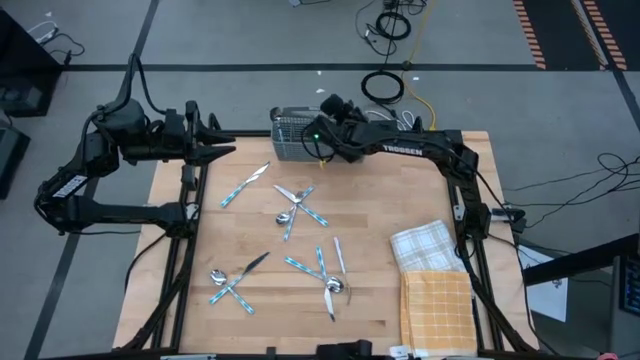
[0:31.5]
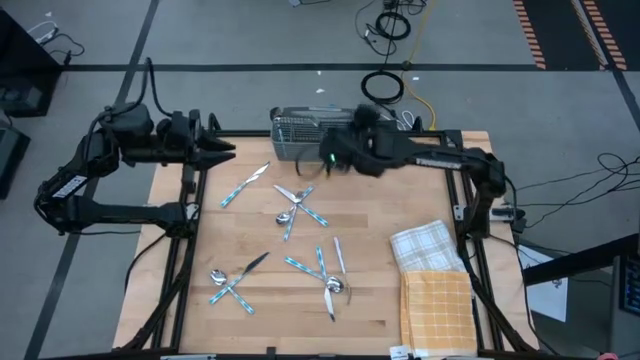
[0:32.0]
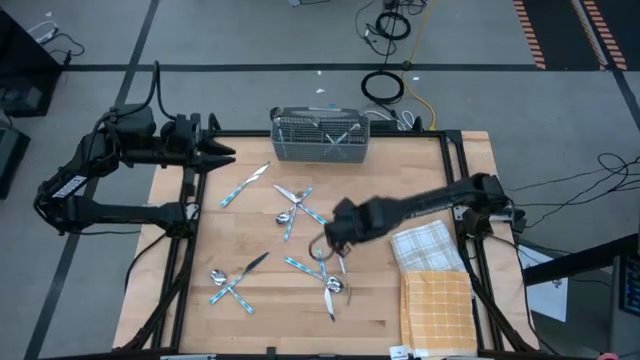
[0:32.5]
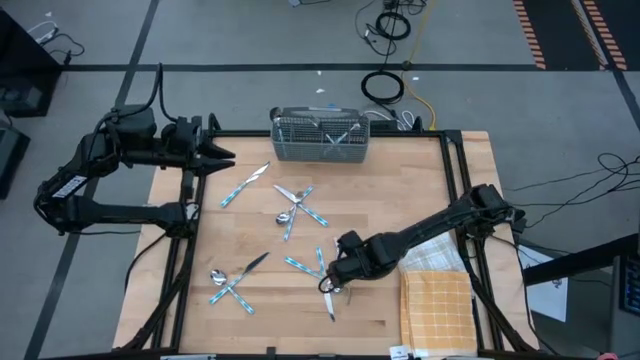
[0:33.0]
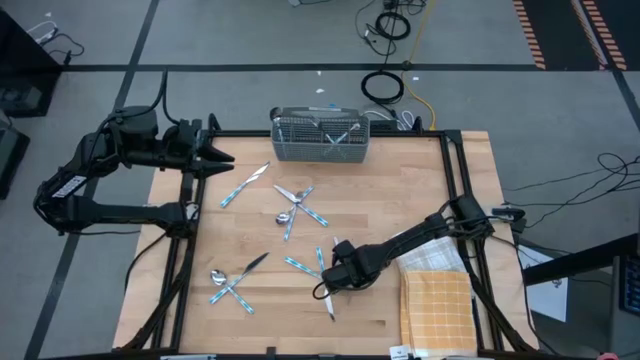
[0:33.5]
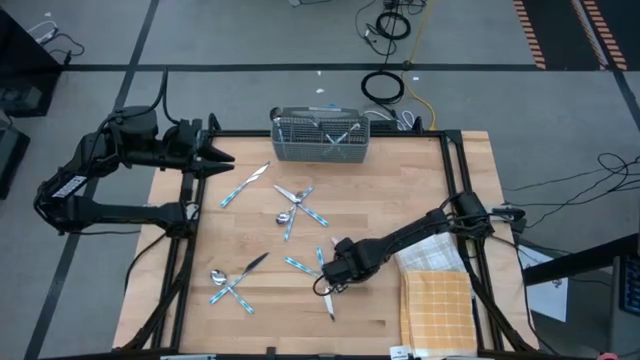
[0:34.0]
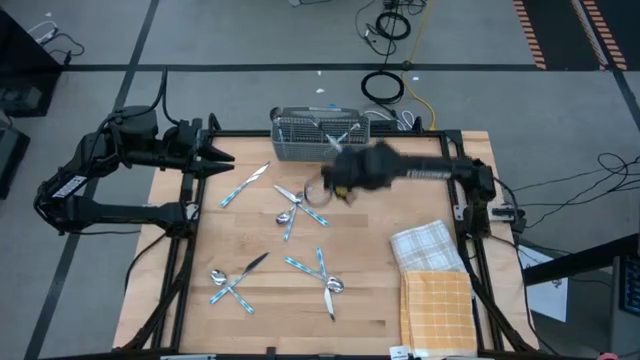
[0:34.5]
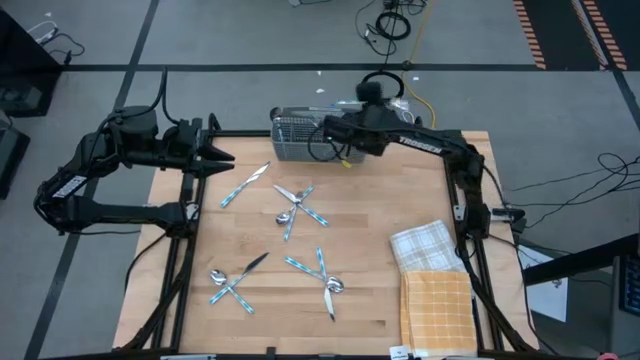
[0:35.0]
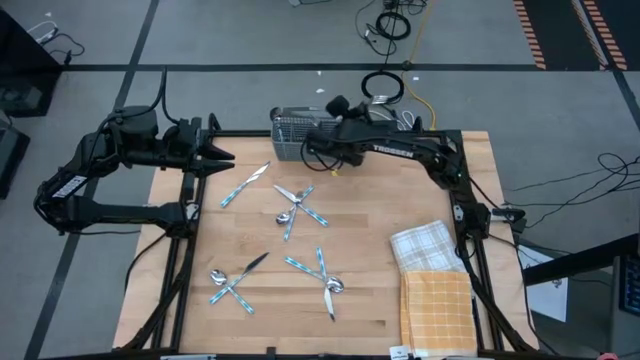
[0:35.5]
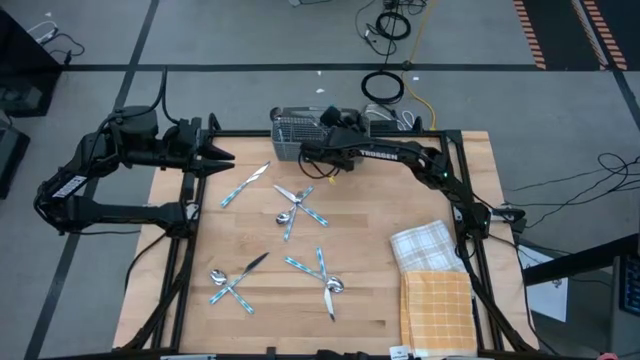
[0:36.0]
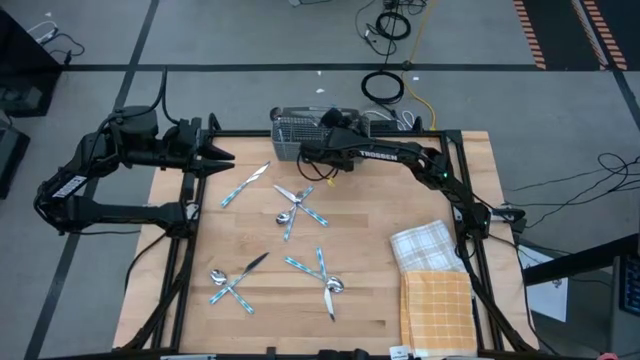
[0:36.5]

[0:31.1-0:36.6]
Task: Sort silverware
Put the bottom blue fork into the gray silverware basket

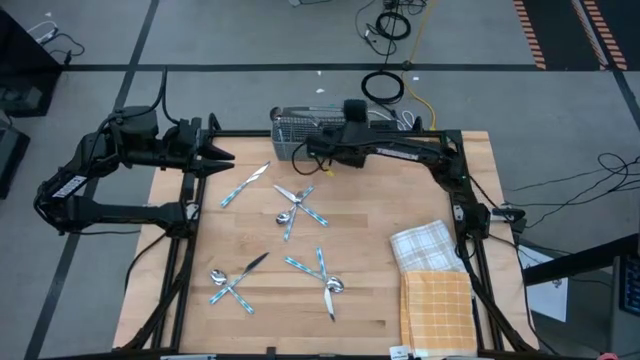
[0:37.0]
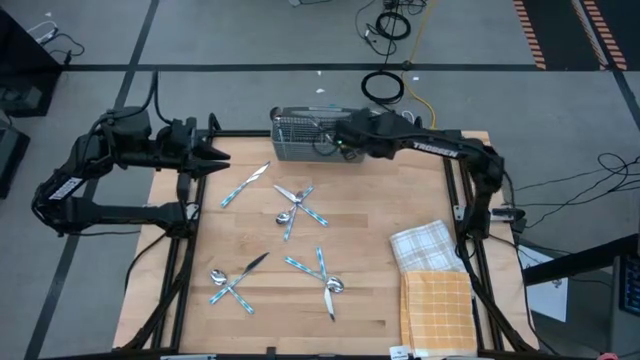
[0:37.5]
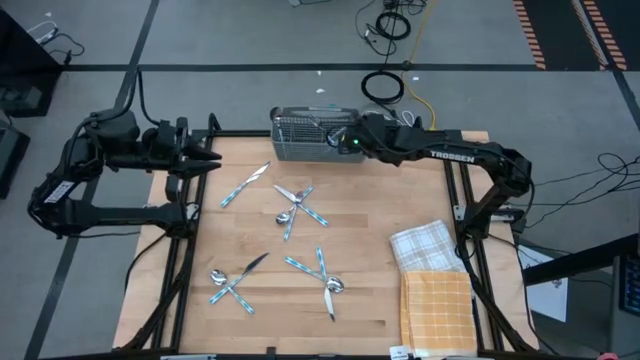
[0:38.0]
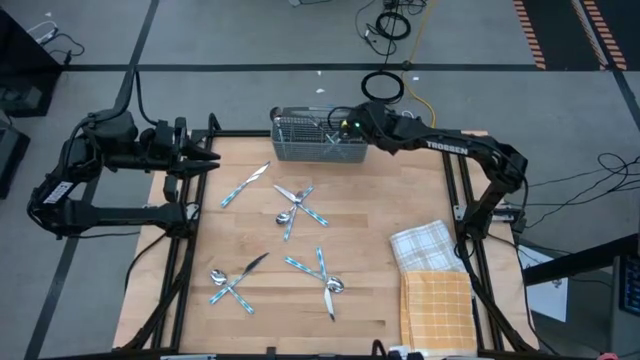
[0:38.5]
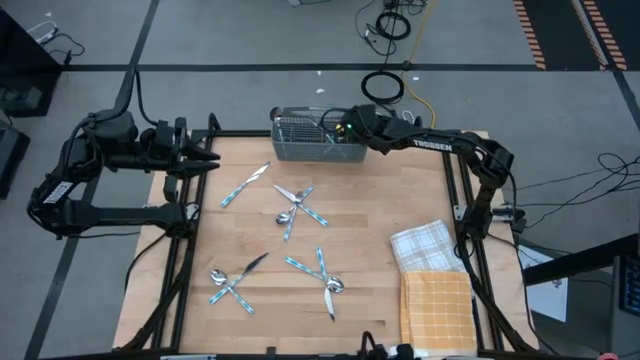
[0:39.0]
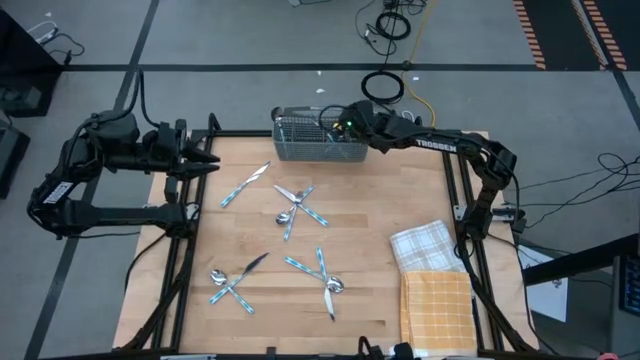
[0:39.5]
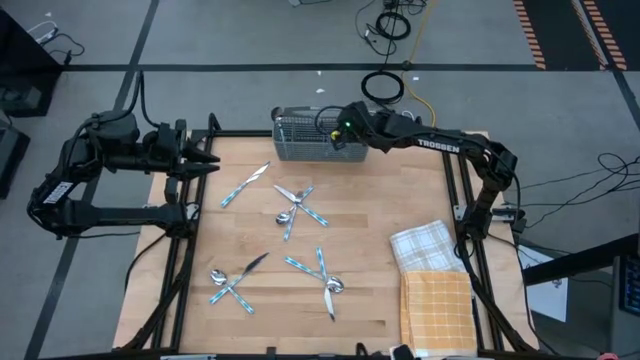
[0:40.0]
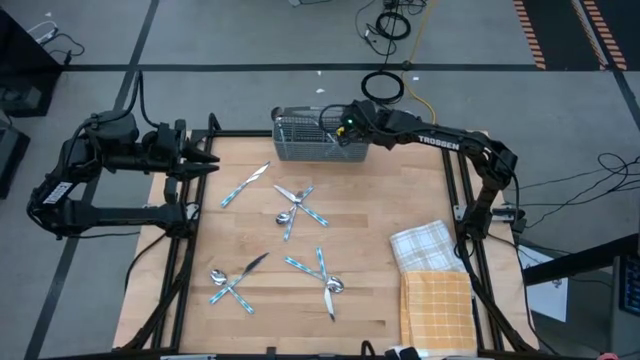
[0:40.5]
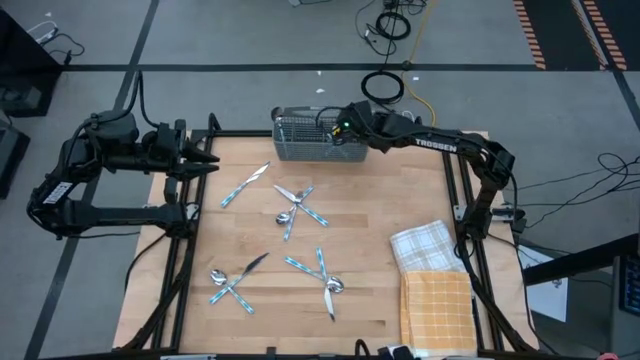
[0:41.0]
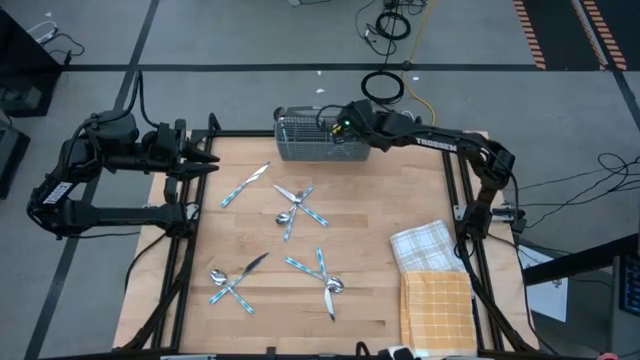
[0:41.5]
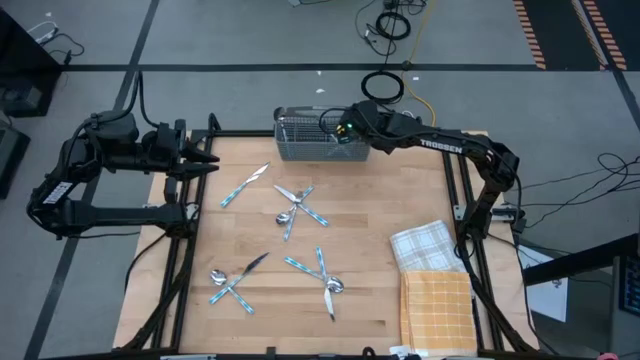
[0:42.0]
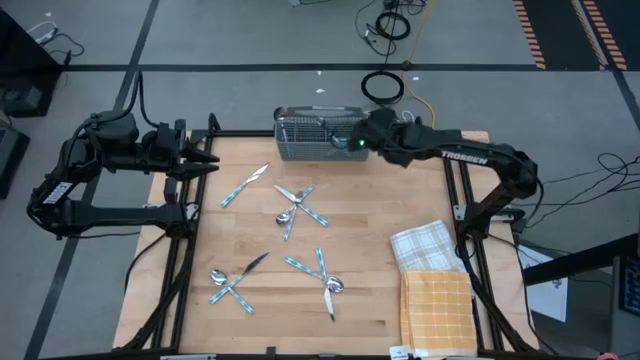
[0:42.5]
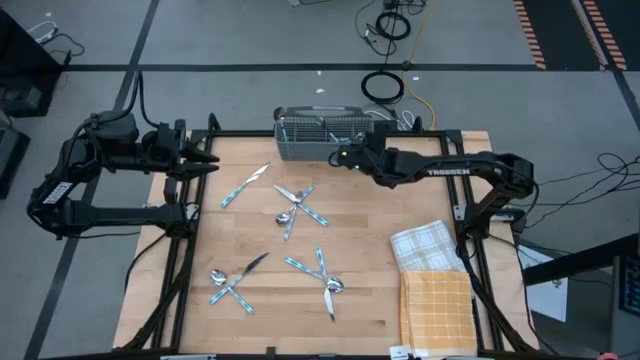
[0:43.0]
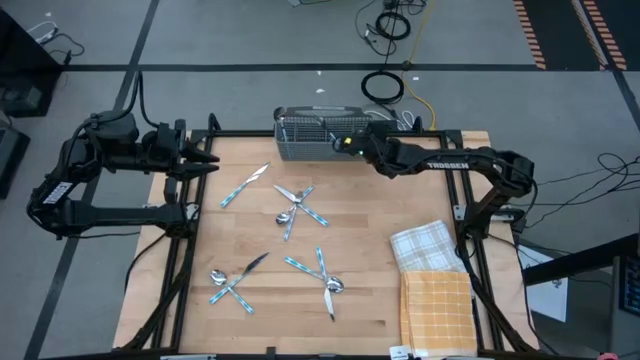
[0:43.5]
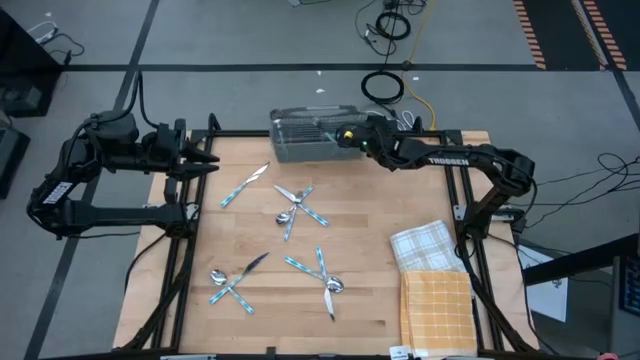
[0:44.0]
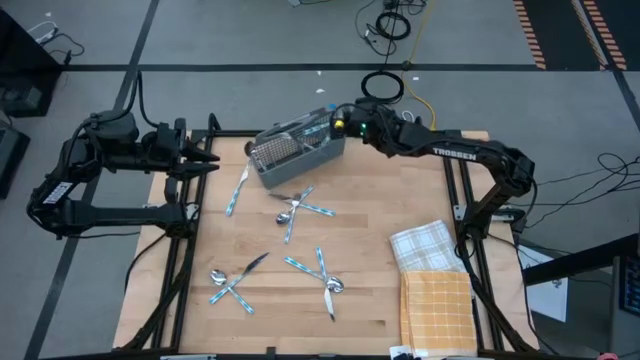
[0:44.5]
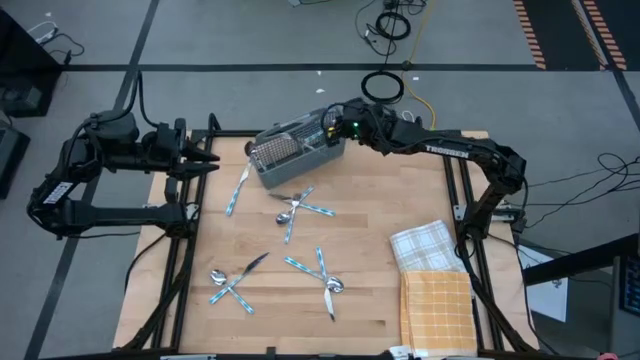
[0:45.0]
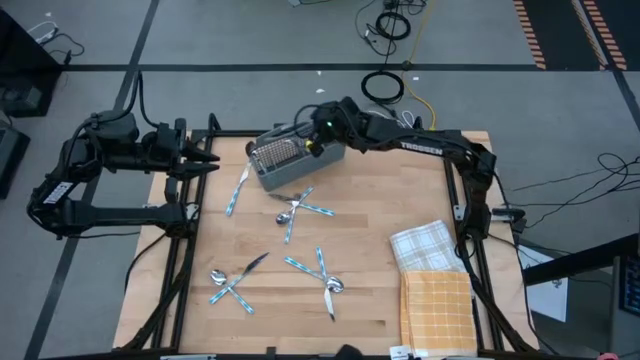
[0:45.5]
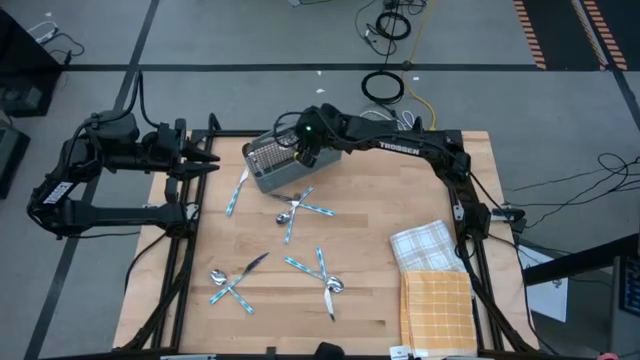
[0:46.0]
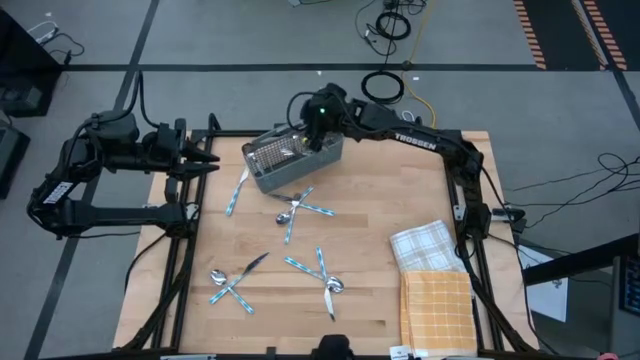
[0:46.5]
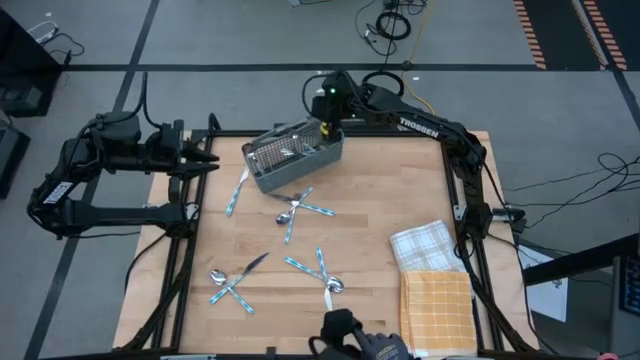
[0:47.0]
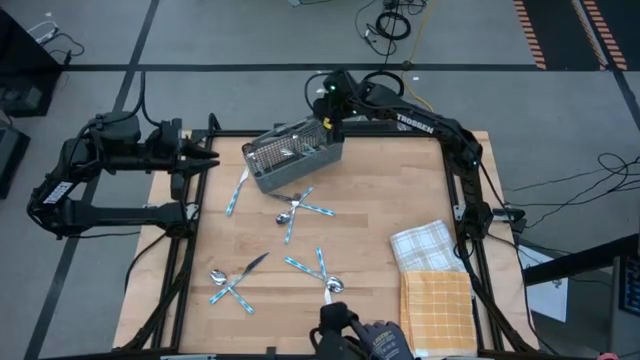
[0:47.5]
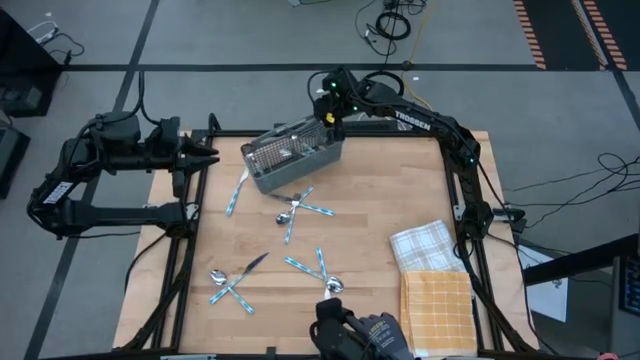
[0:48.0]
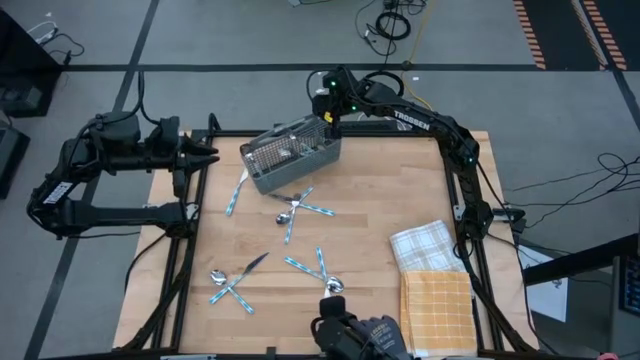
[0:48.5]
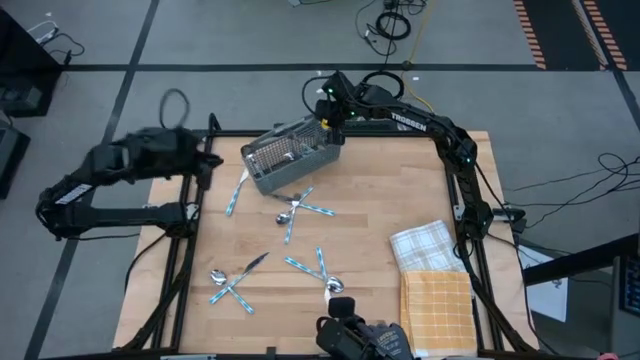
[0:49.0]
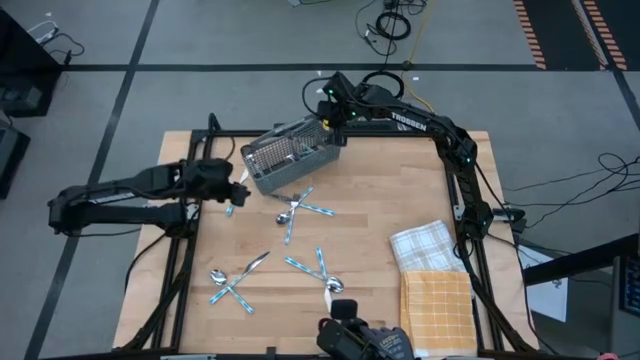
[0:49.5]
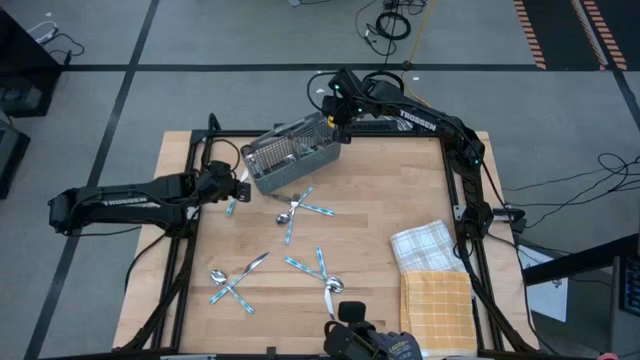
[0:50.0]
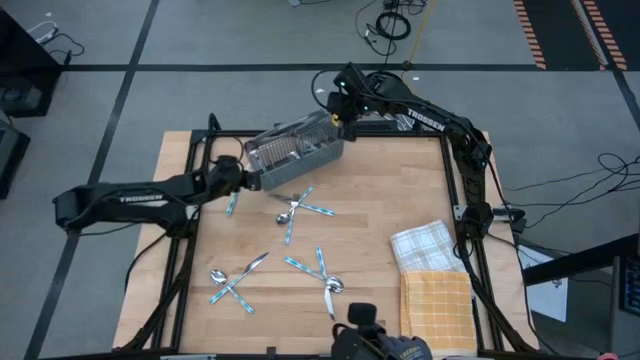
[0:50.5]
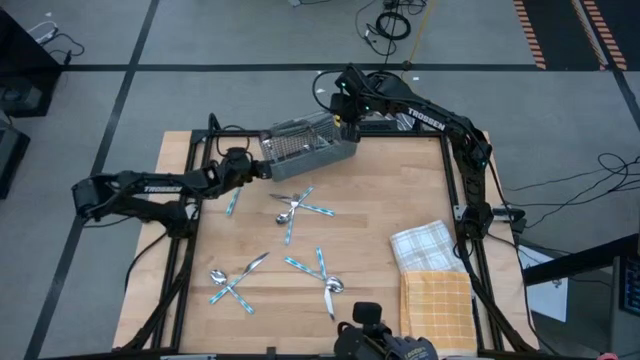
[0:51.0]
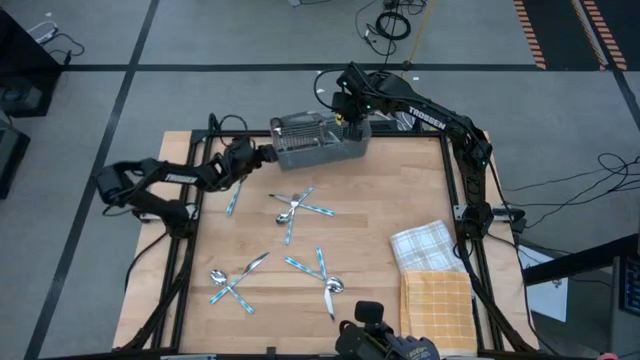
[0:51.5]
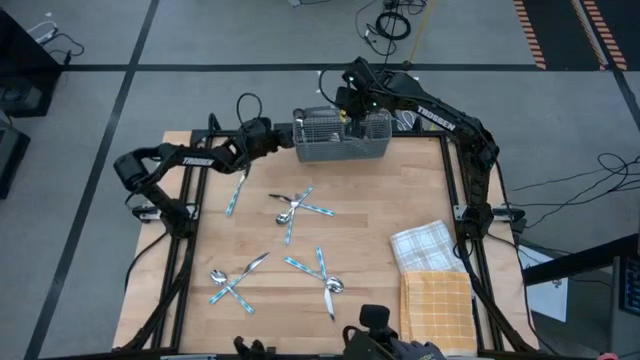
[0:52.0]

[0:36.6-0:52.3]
Adjust the gray silverware basket

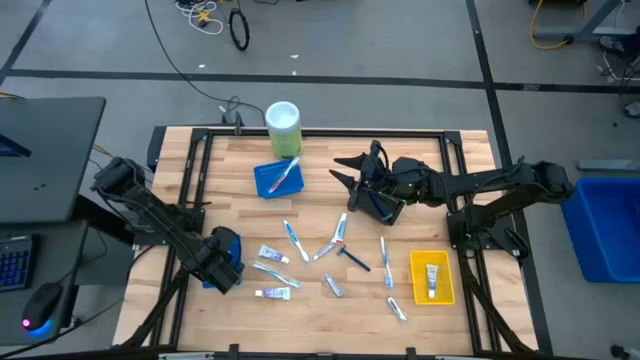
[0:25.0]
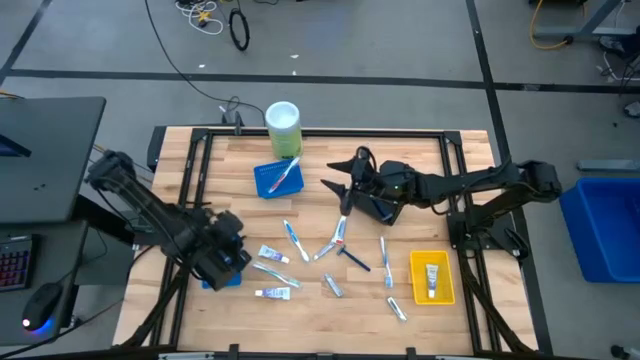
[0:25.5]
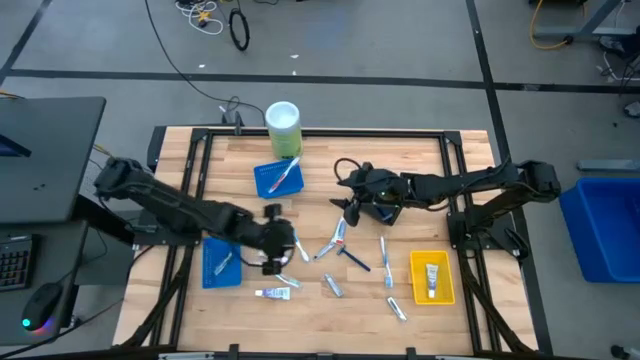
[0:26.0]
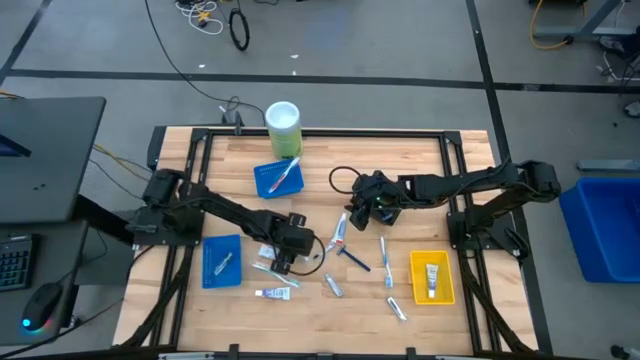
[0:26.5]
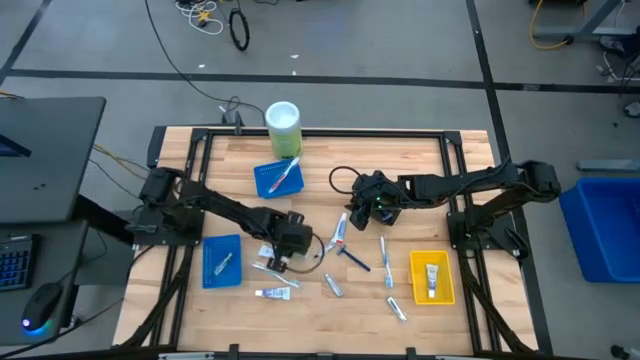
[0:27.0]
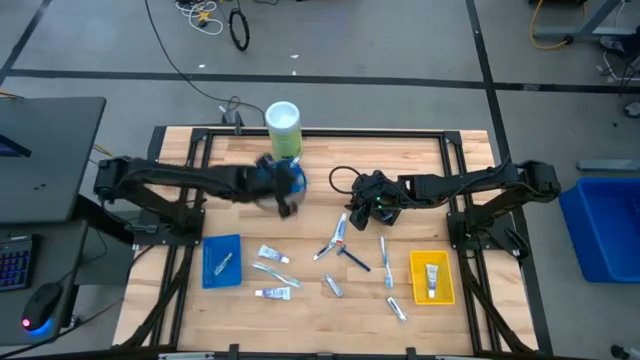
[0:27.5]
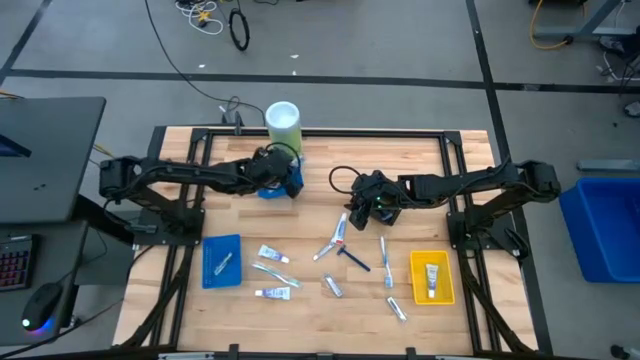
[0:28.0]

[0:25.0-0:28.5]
Task: Pick & Place Travel size toiletries
Put the blue toothbrush into the top blue bin
